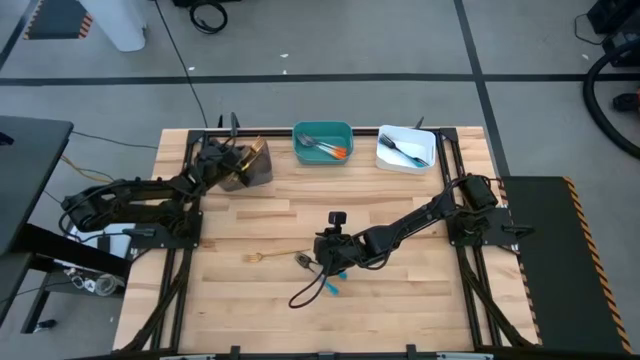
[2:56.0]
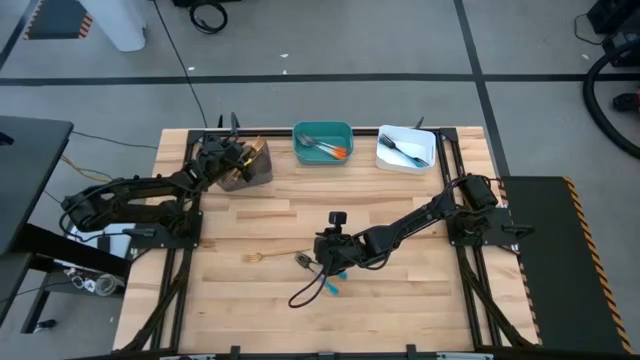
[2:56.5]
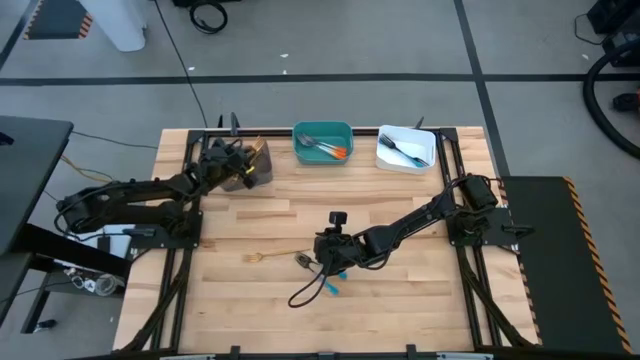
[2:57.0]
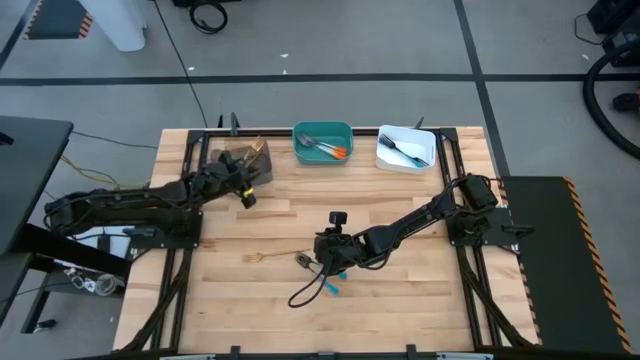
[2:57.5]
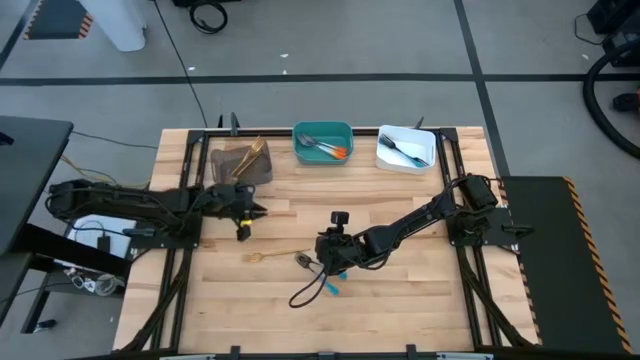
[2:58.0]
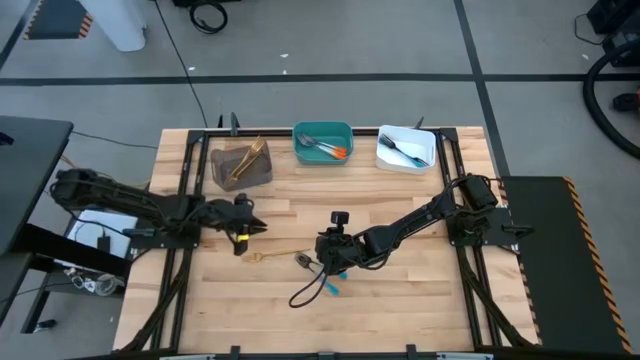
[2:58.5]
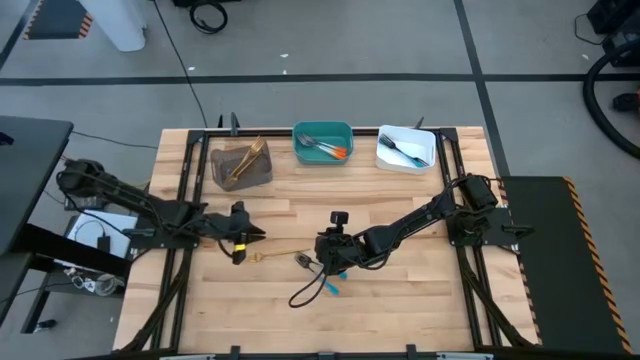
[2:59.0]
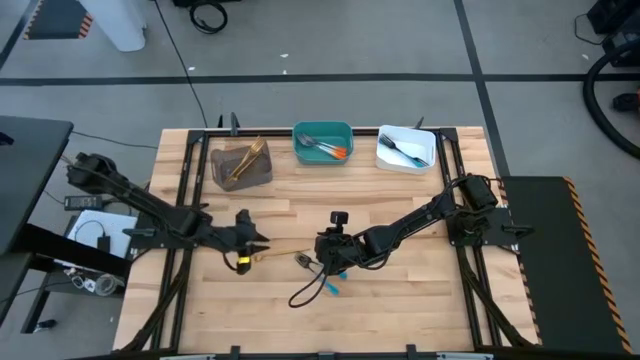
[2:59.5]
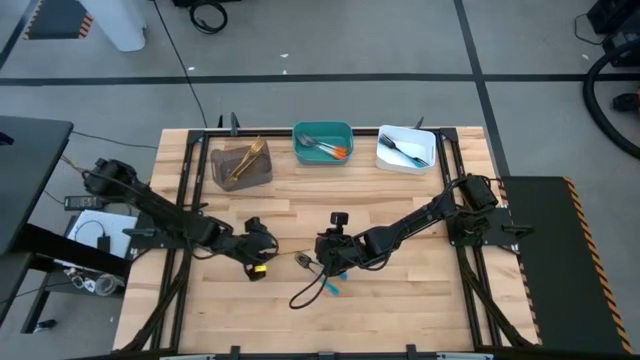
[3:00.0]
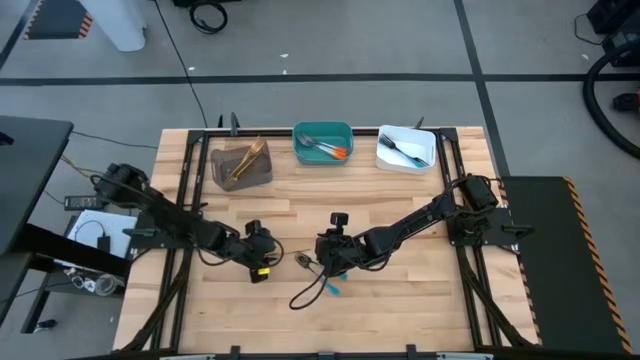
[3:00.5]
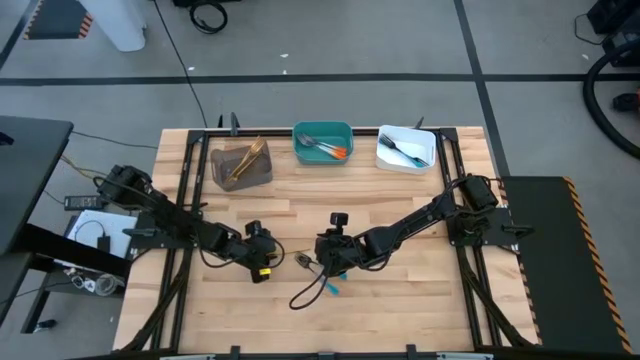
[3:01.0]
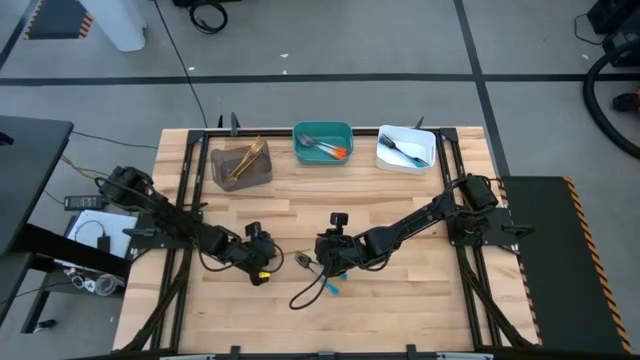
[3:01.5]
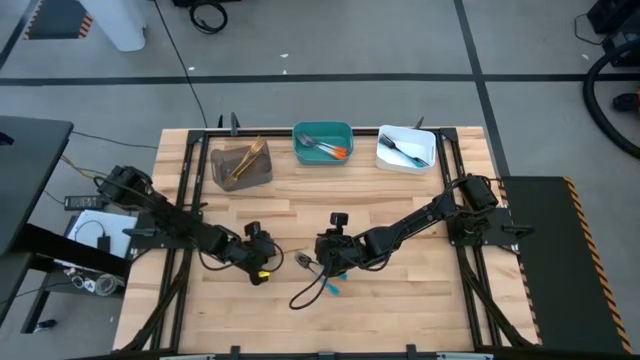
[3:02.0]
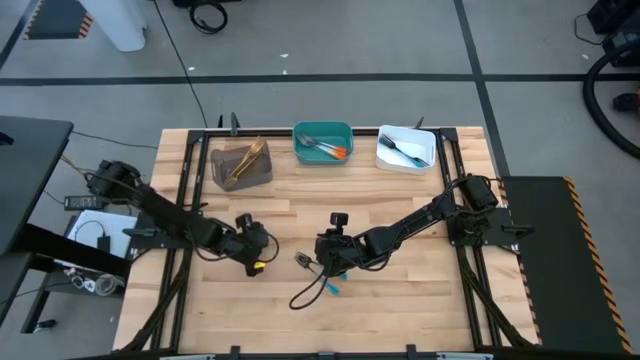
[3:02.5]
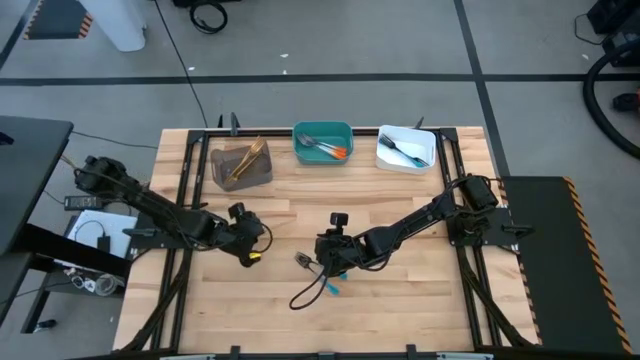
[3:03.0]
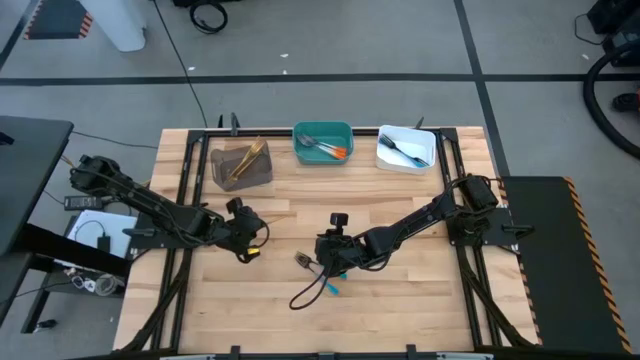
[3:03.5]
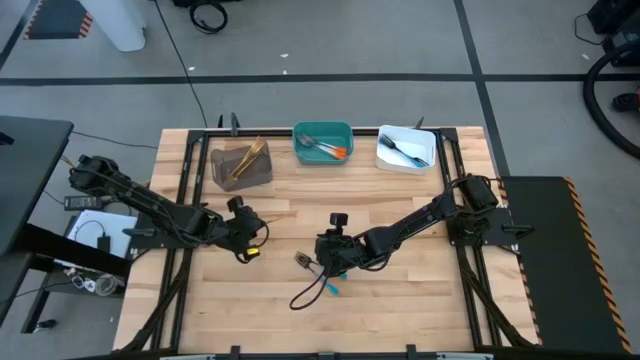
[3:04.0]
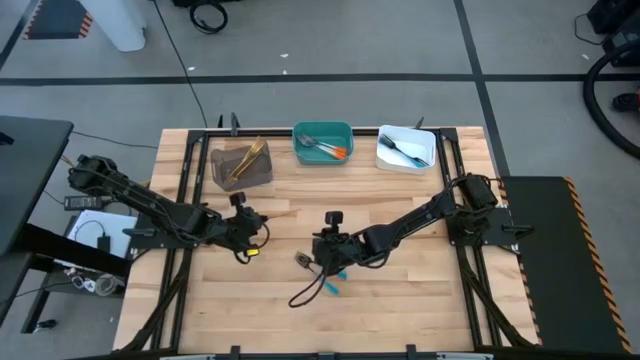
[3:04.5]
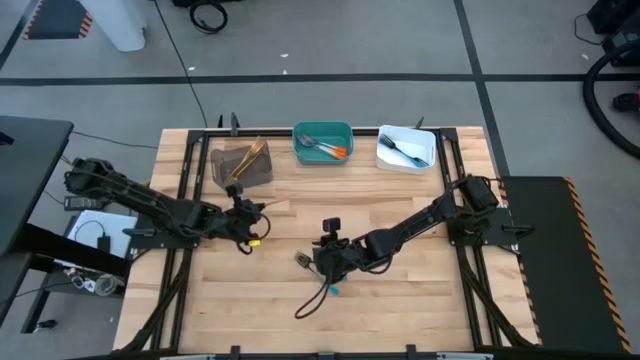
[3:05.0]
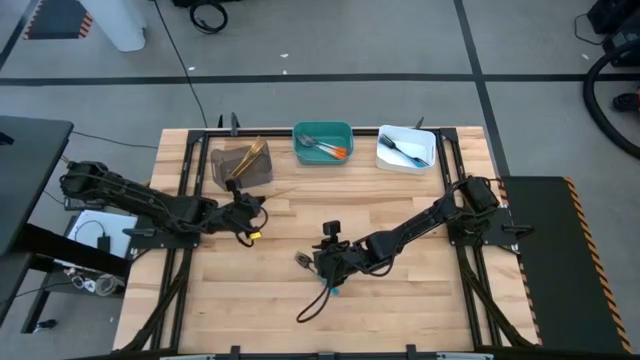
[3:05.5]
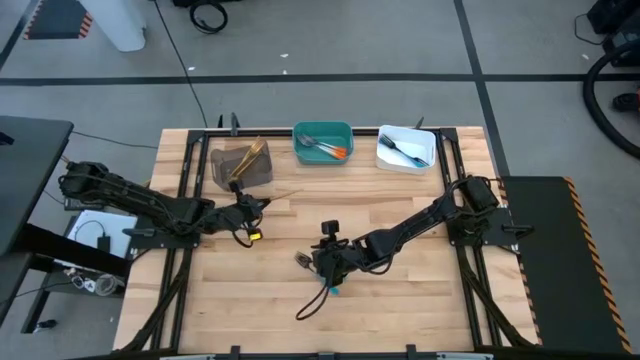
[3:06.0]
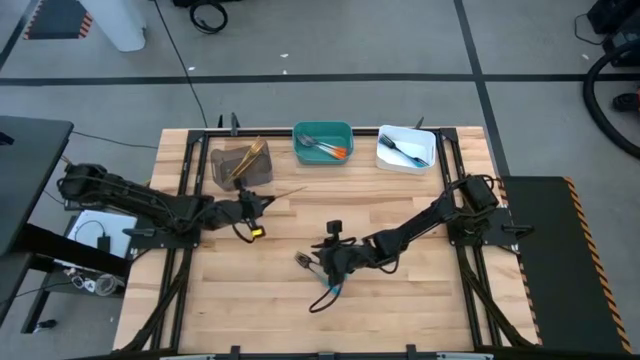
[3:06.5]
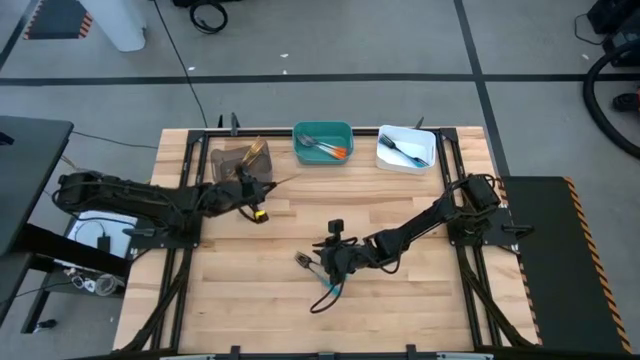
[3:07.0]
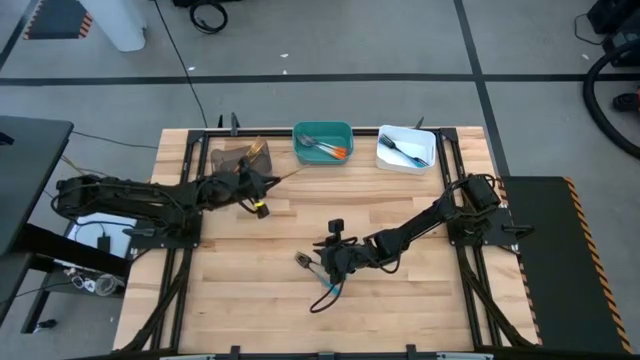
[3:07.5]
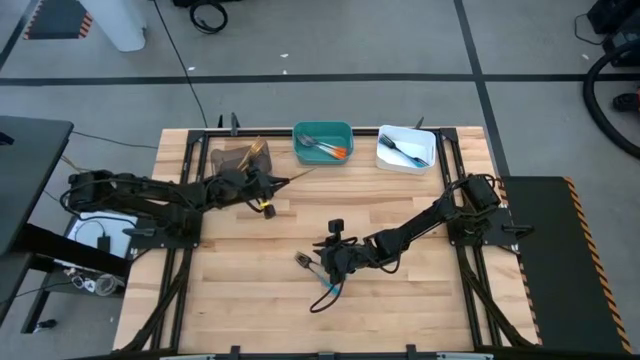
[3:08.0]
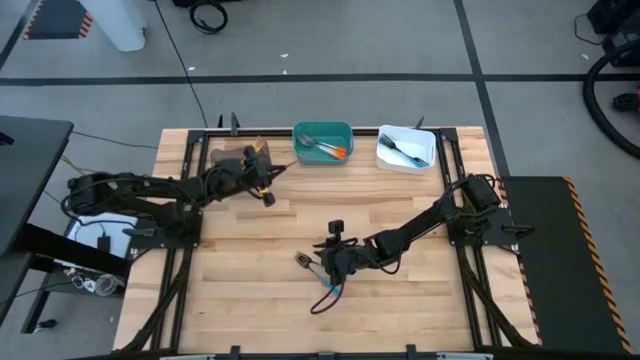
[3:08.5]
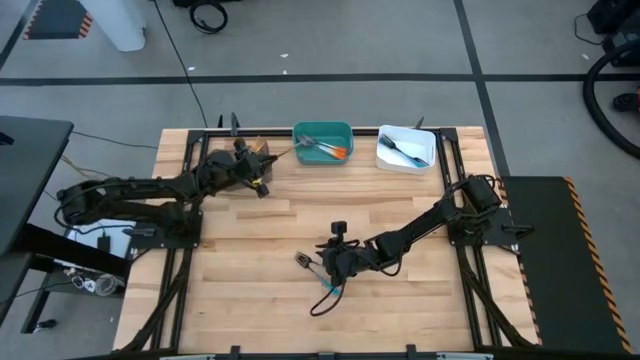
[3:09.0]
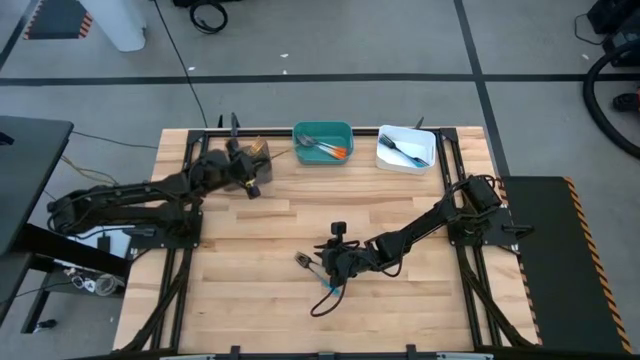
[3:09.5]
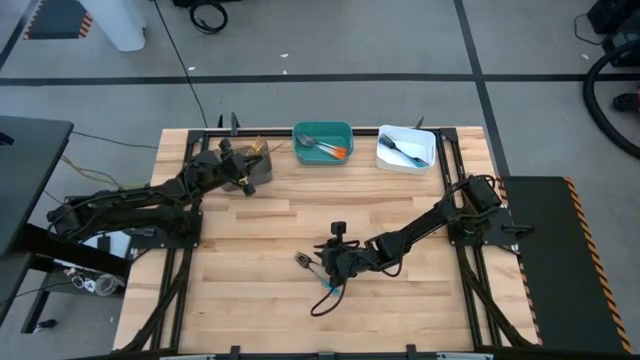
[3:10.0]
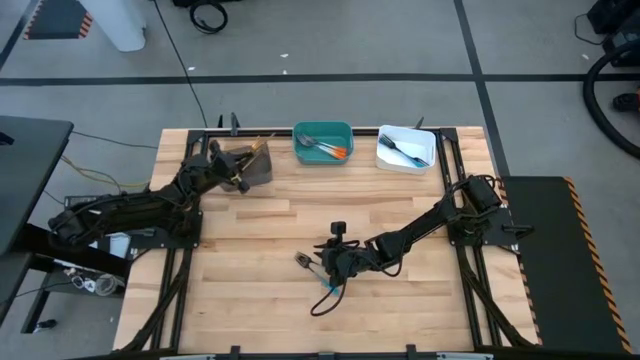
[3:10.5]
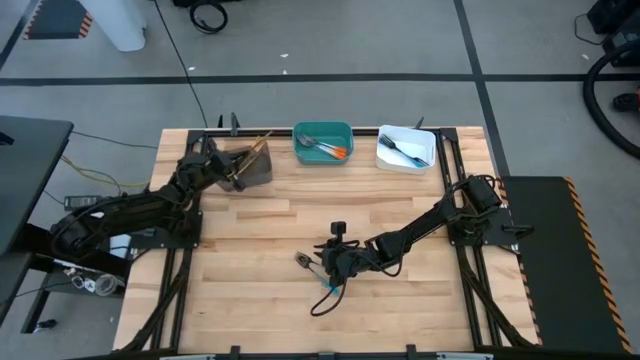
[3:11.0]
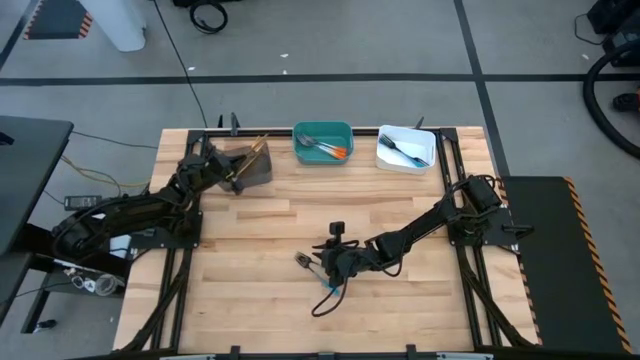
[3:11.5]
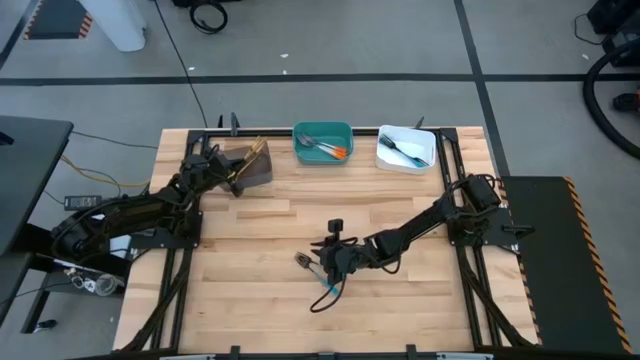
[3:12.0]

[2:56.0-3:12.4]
Task: Sort silverware by color (type)
Put the gold fork into the black bin

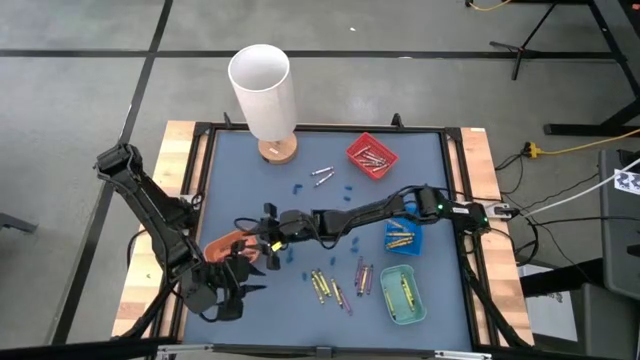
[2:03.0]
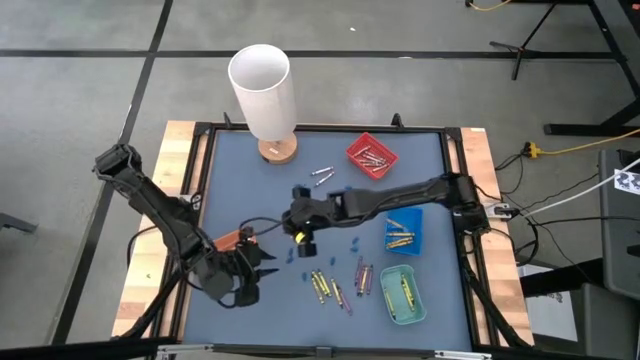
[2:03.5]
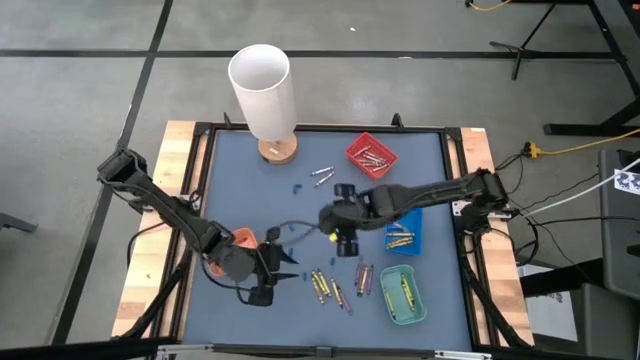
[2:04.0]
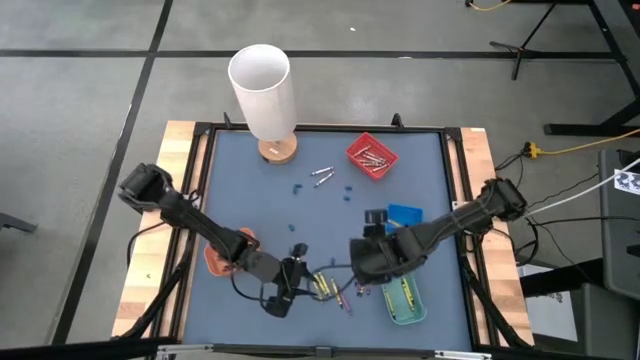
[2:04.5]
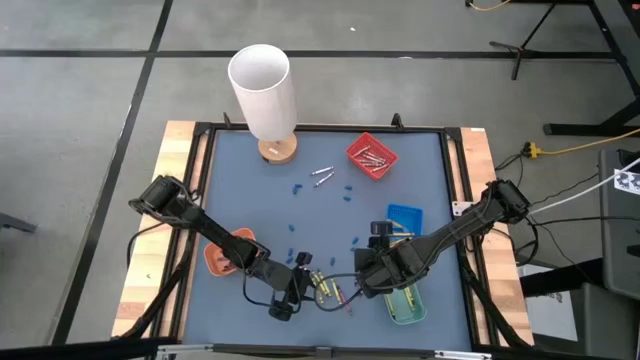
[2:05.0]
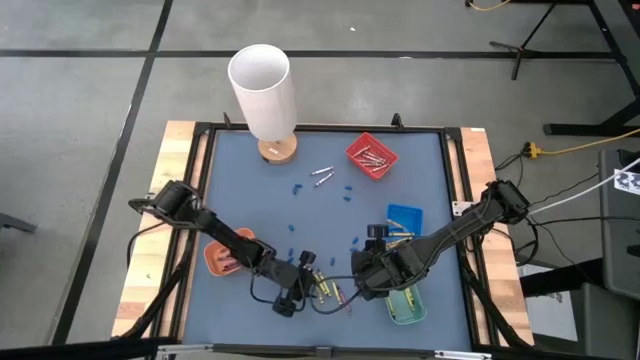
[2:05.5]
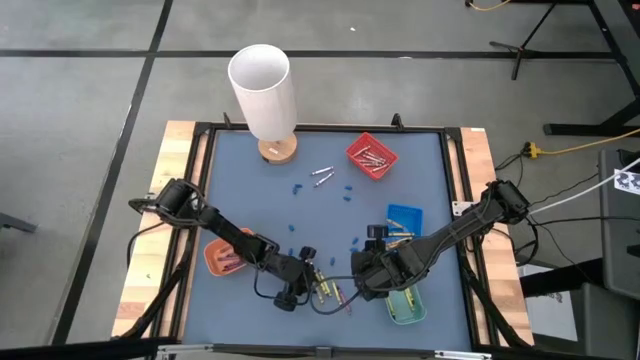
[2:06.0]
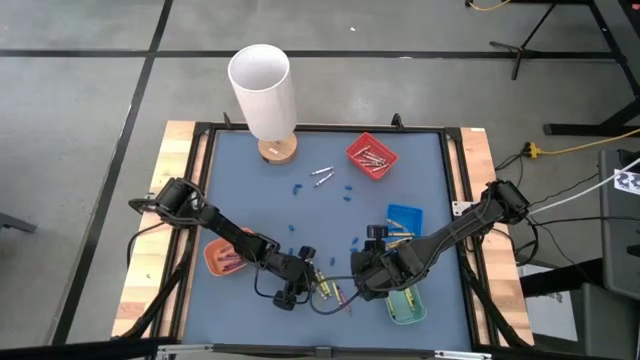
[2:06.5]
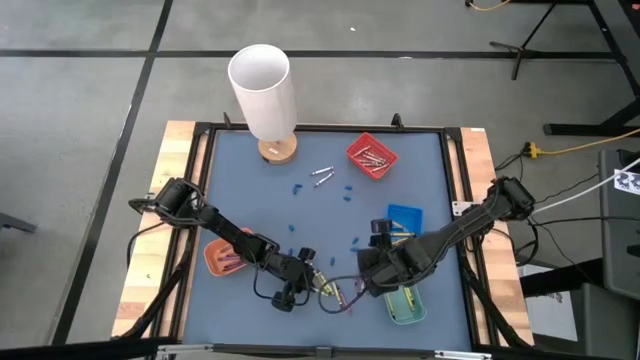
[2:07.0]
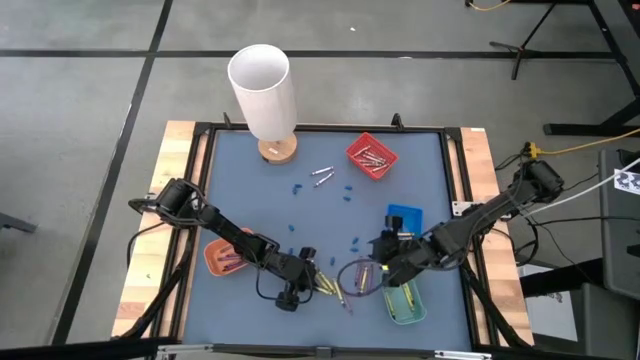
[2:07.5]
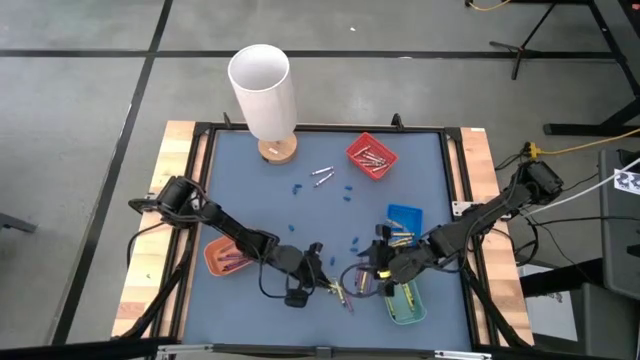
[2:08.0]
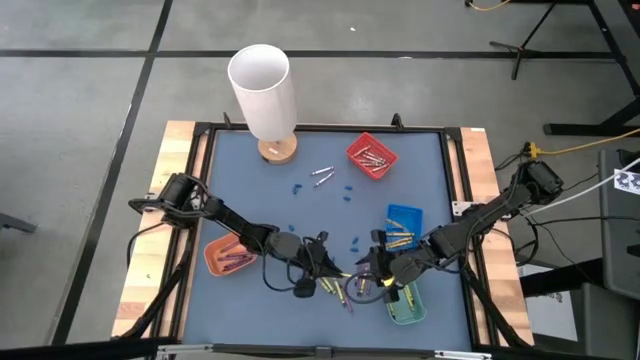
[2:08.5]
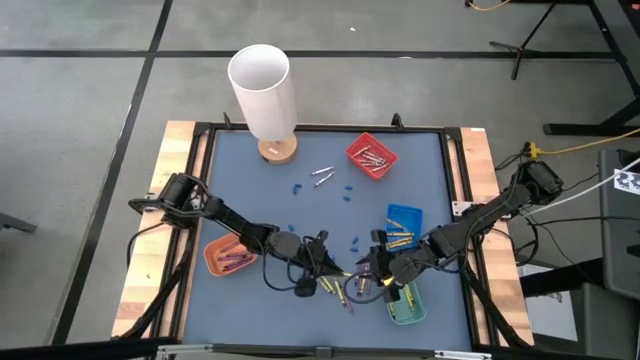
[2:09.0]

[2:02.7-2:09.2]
Task: Sort crayons
Put the green crayon into the green bin
